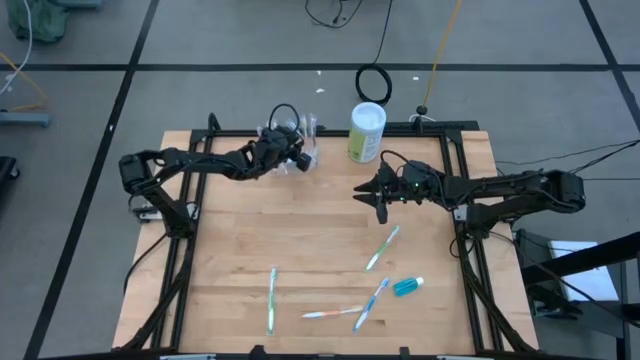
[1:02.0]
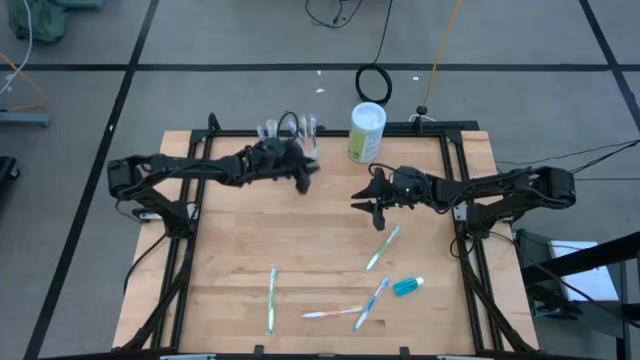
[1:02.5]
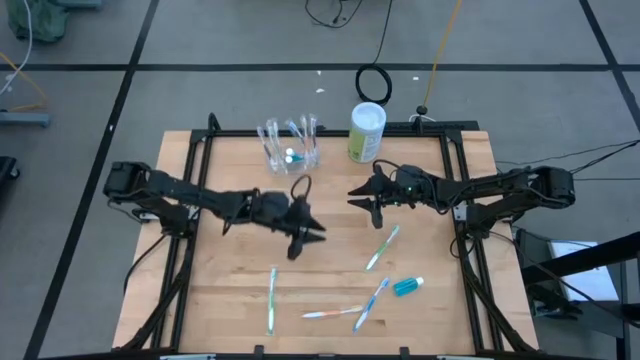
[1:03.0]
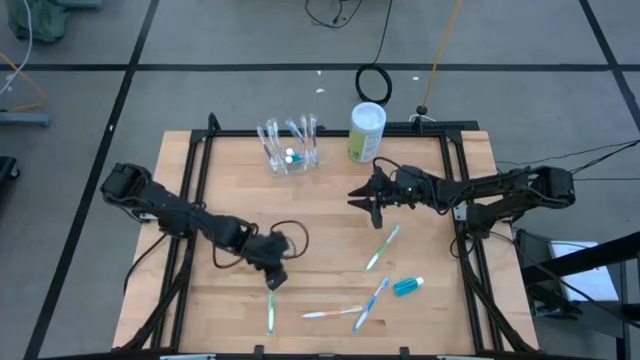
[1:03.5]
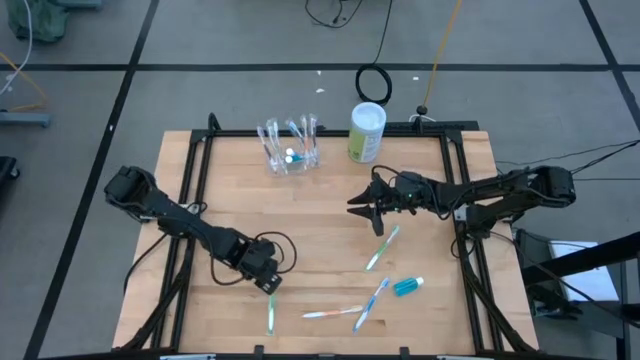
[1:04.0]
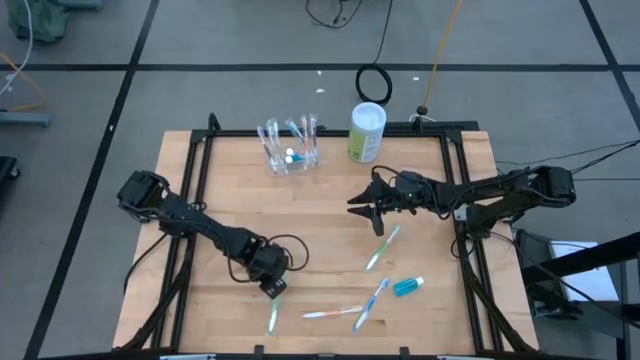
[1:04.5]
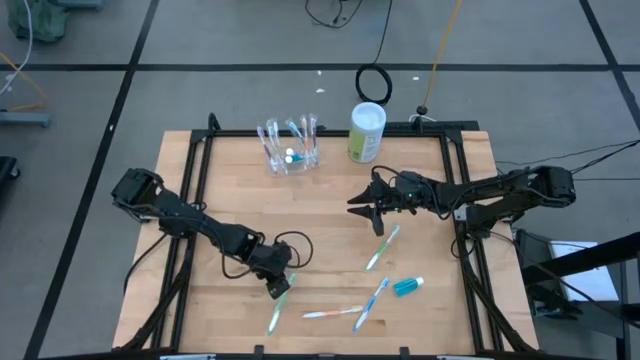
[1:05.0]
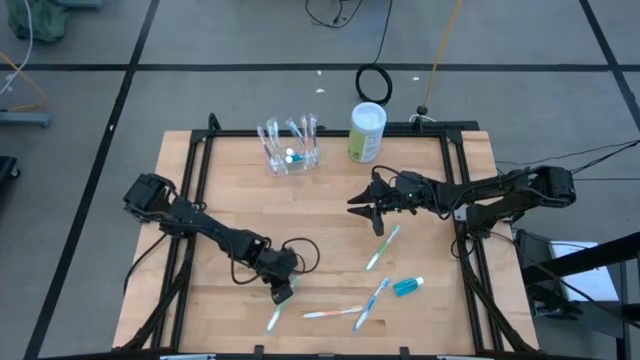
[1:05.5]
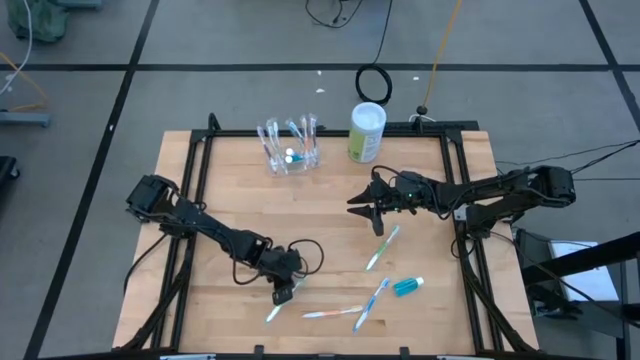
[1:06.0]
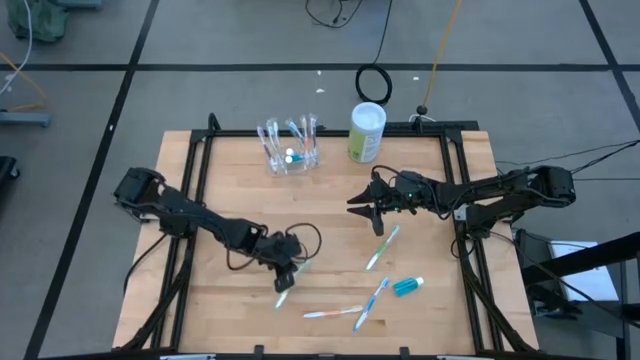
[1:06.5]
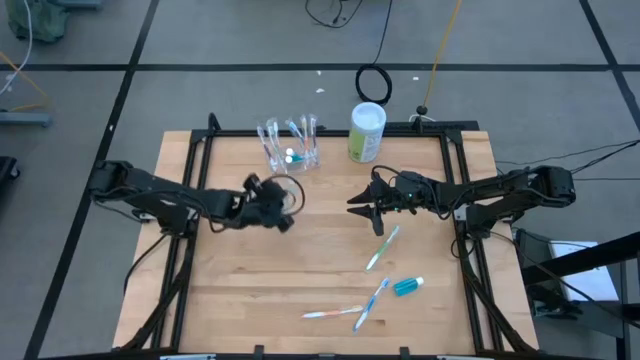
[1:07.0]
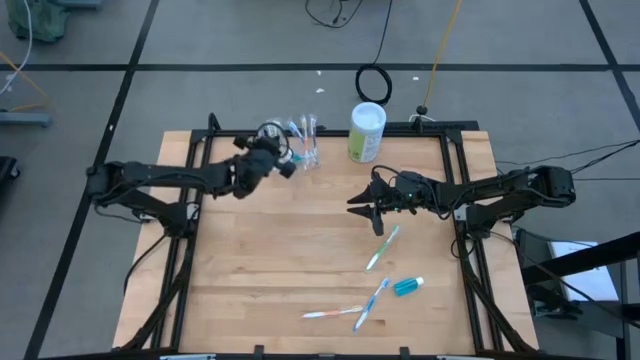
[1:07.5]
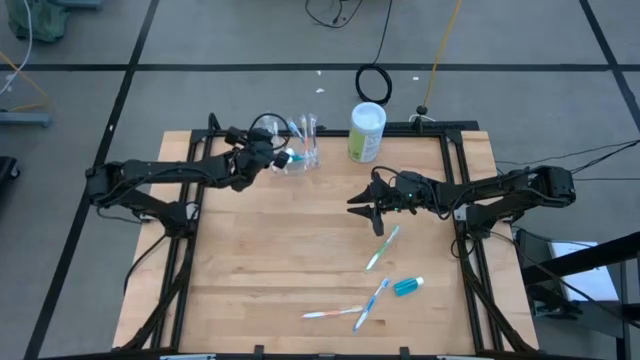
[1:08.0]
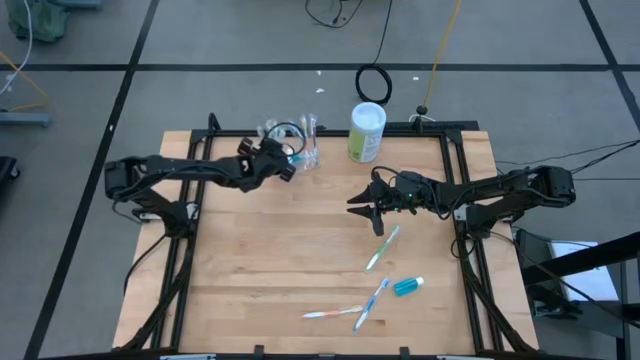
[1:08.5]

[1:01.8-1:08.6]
Task: Pick & Place toothbrushing station
Put the left green toothbrush into the transparent organizer

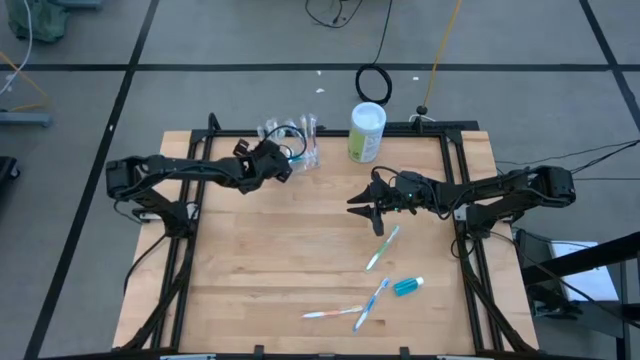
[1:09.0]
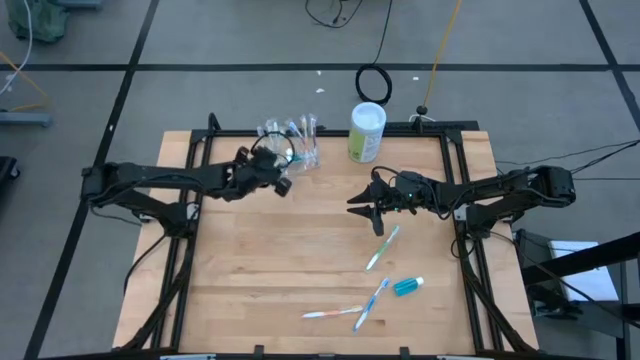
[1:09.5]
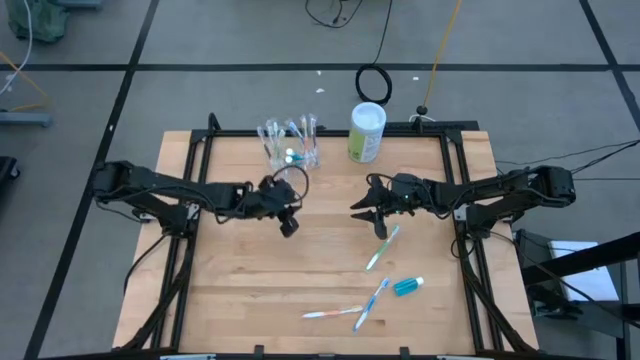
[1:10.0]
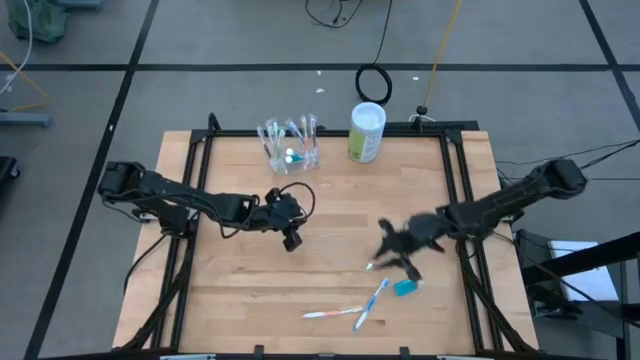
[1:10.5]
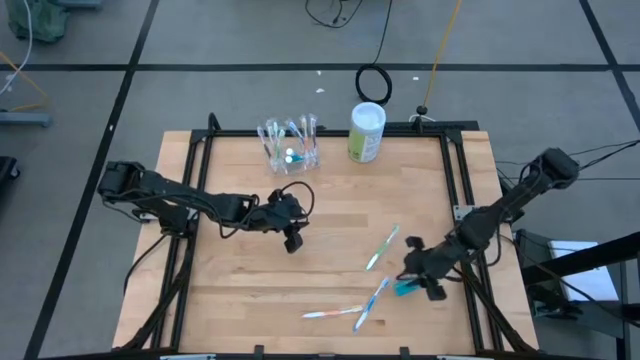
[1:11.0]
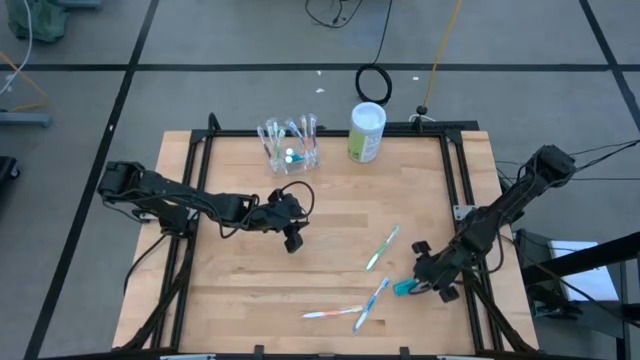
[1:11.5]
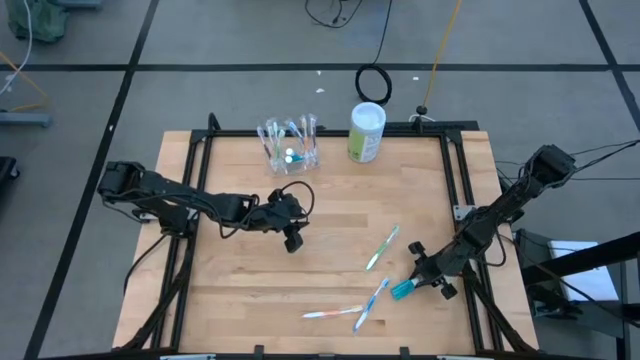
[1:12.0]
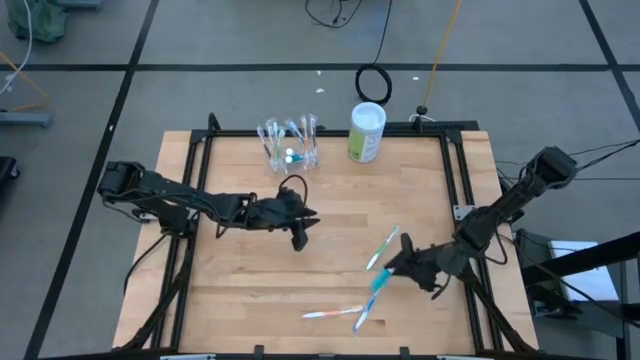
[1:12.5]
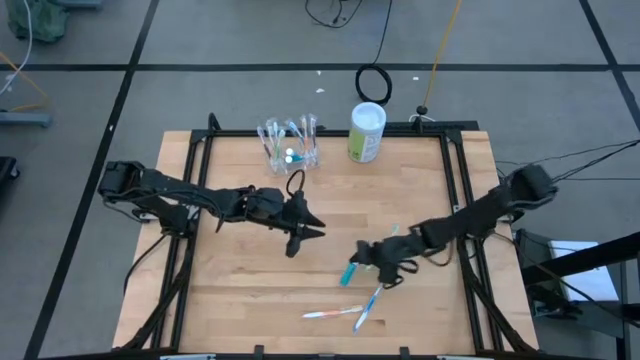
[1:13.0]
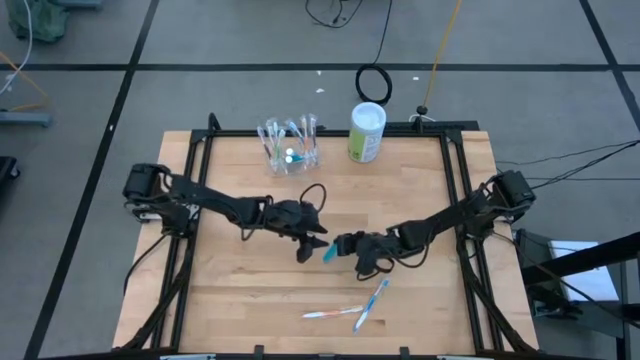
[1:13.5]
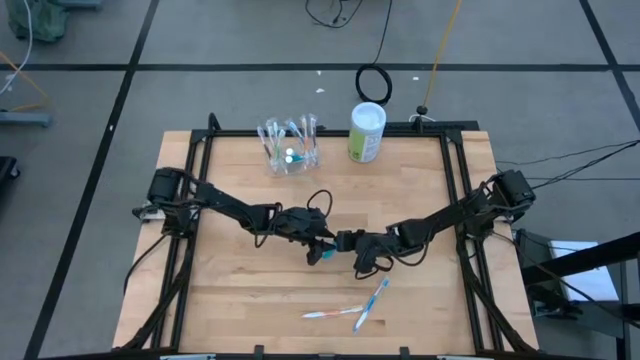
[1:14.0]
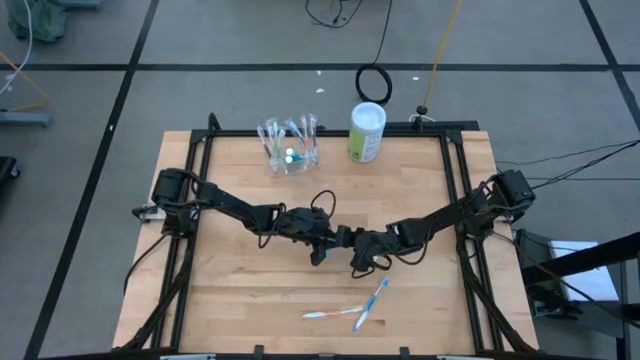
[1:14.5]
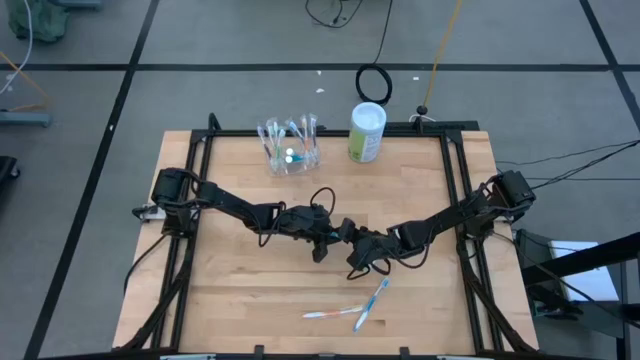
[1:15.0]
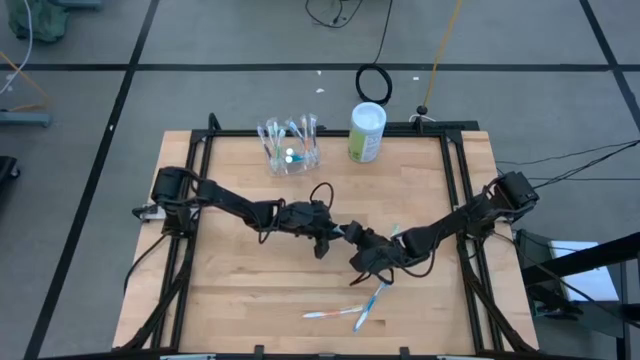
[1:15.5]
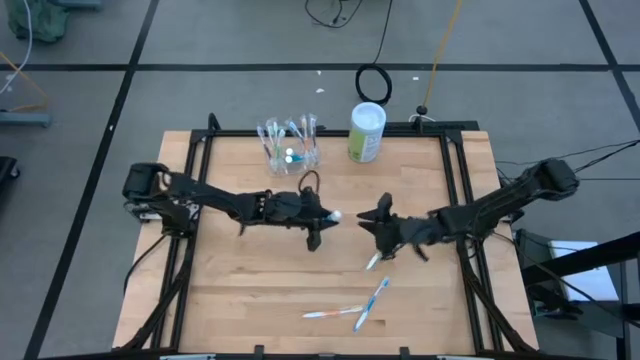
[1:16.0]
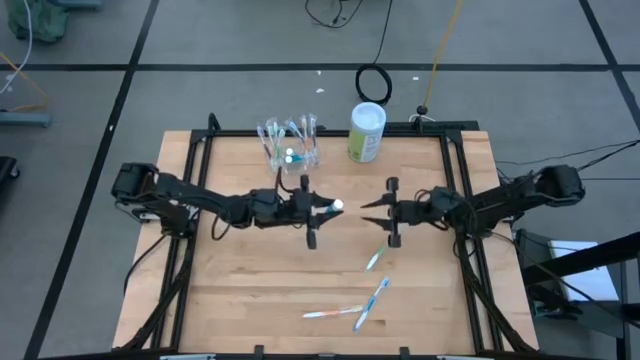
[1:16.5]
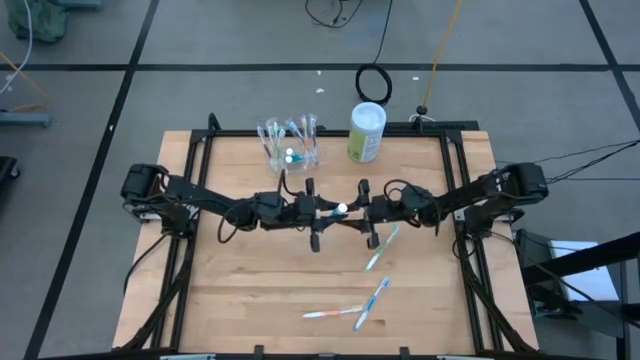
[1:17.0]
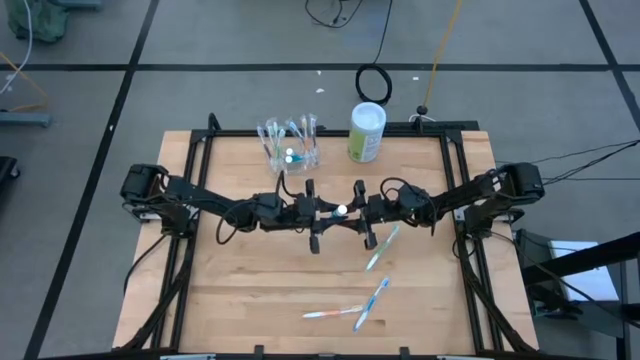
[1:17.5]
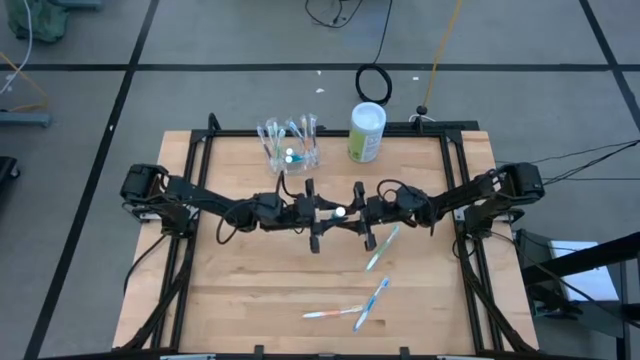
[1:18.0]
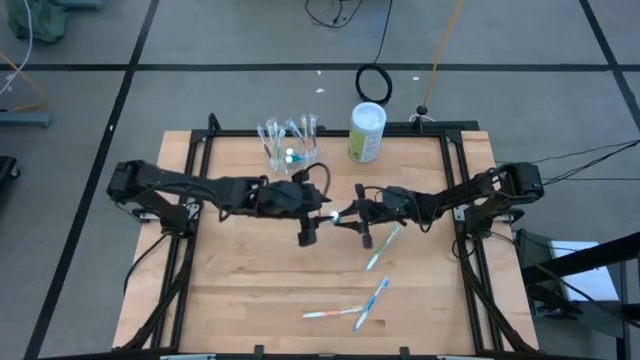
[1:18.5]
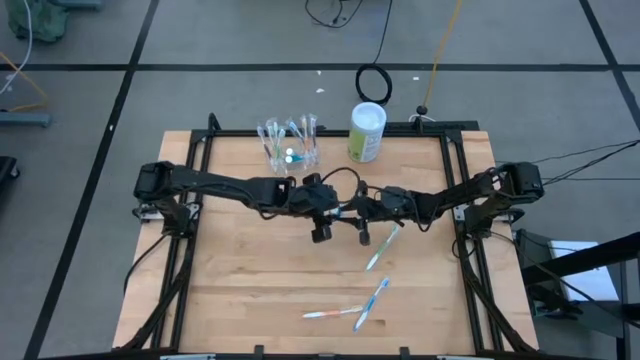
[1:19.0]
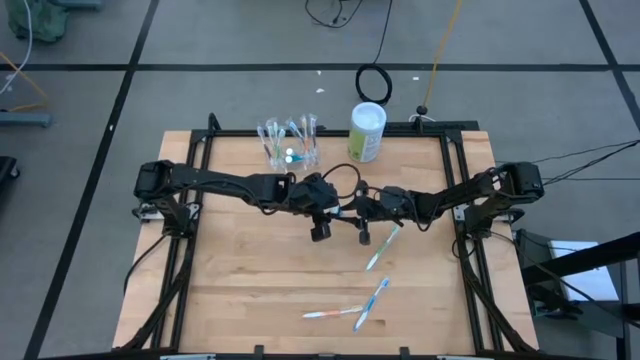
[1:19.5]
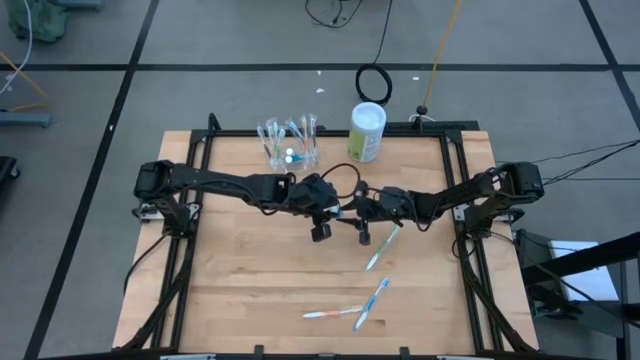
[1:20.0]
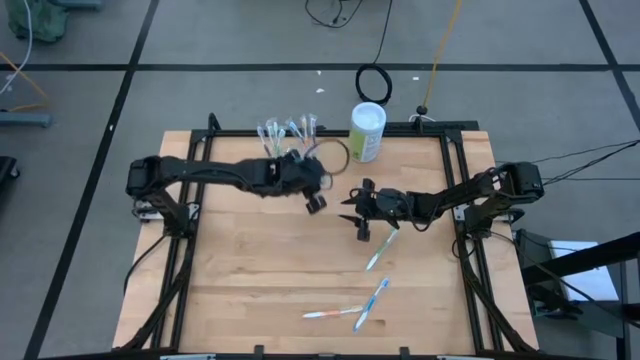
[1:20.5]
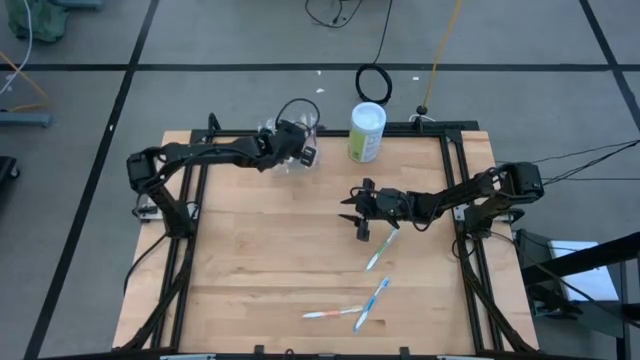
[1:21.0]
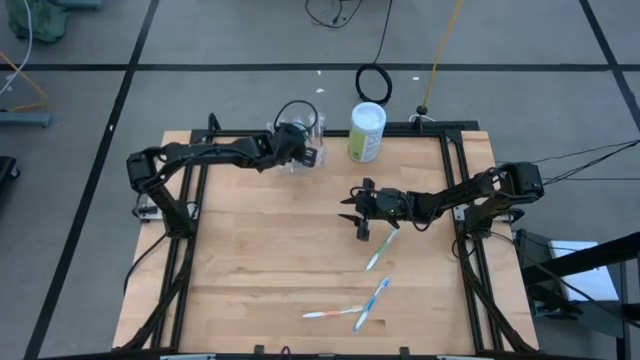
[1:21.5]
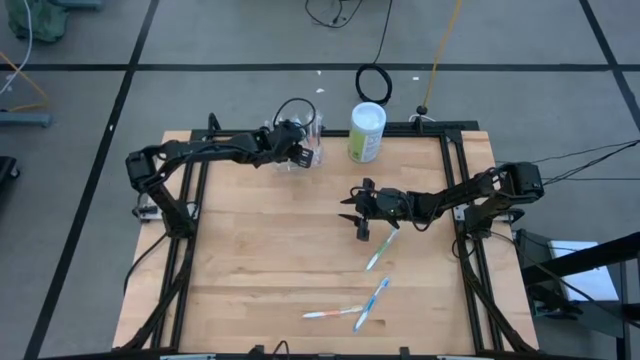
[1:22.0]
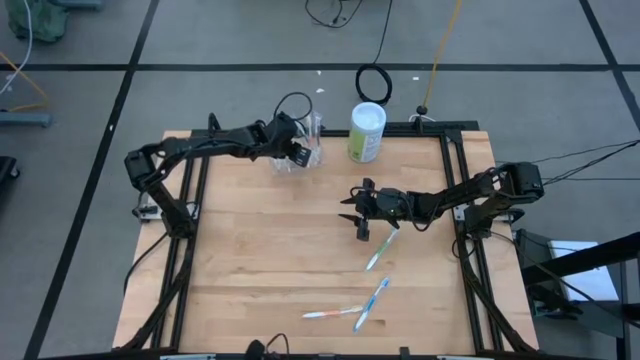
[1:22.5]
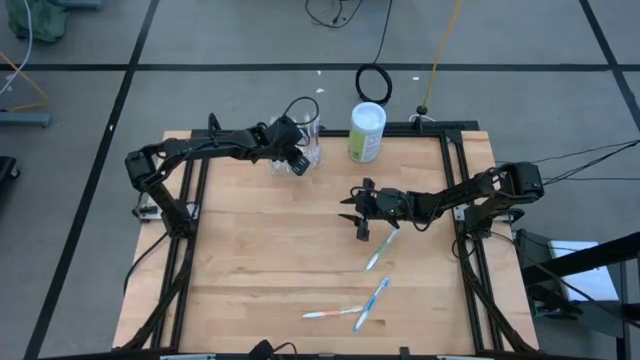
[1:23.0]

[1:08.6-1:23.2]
Put the blue mouthwash into the transparent organizer
